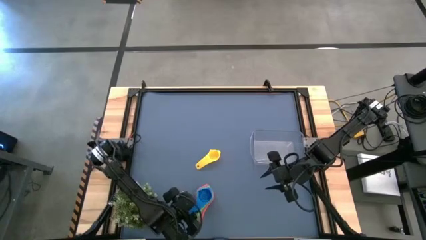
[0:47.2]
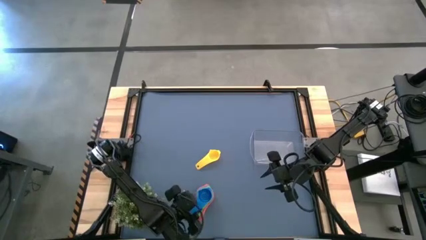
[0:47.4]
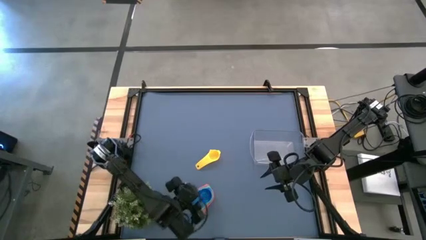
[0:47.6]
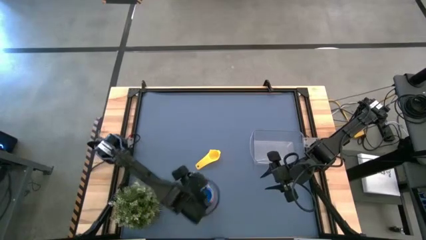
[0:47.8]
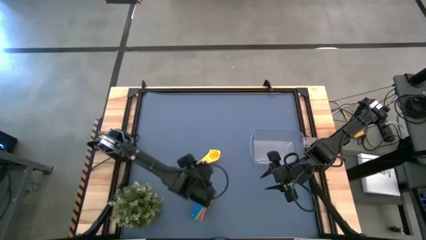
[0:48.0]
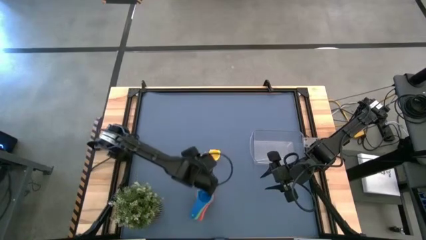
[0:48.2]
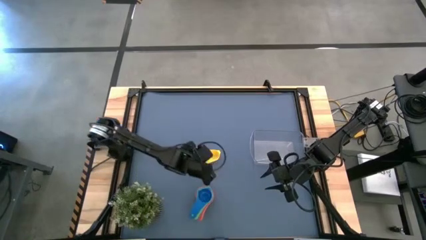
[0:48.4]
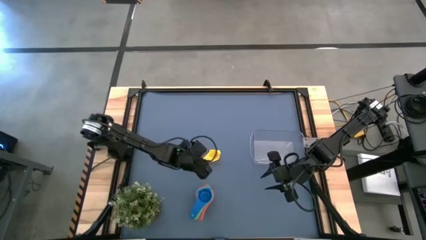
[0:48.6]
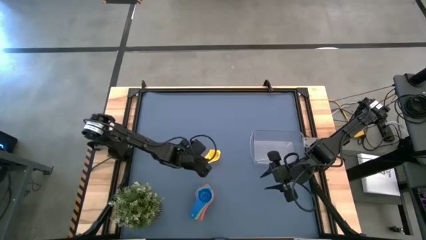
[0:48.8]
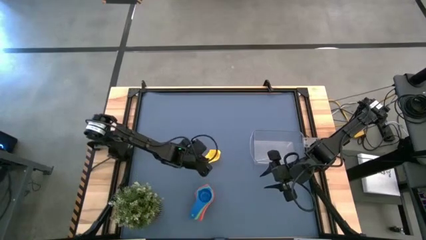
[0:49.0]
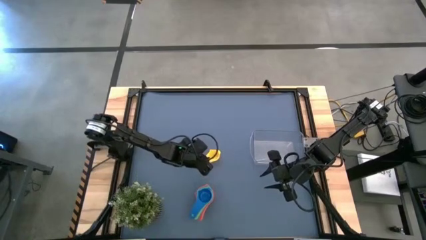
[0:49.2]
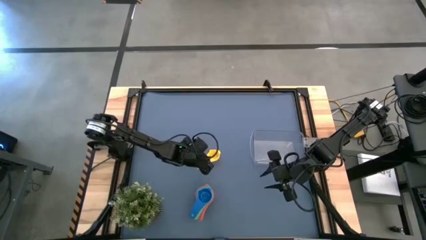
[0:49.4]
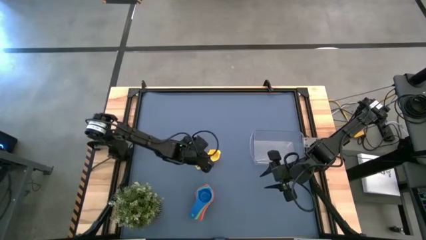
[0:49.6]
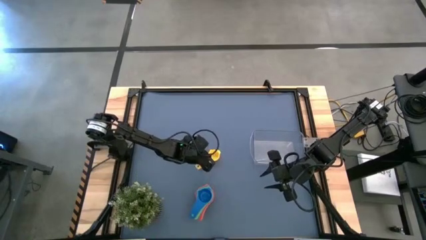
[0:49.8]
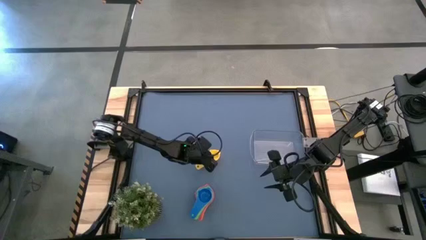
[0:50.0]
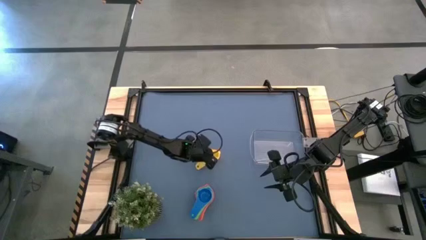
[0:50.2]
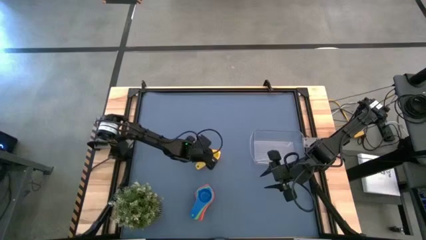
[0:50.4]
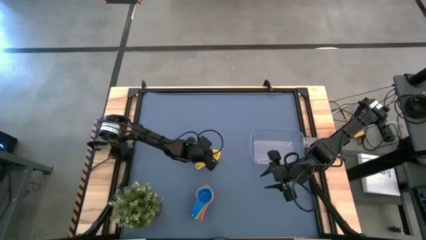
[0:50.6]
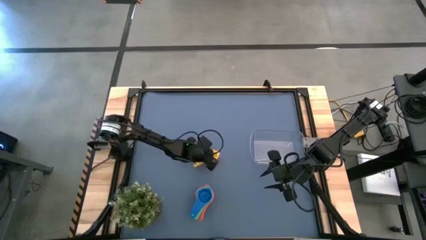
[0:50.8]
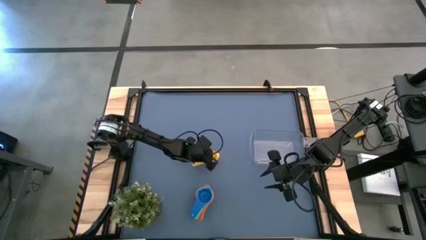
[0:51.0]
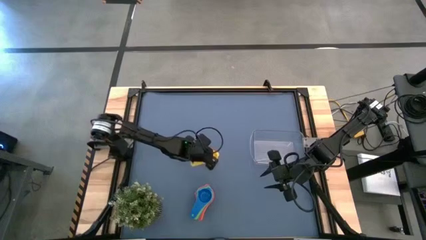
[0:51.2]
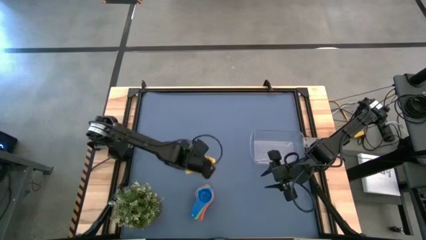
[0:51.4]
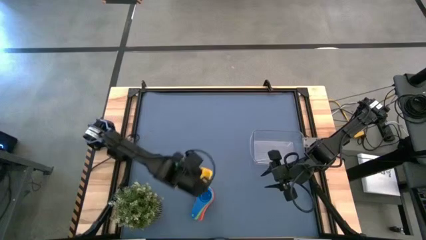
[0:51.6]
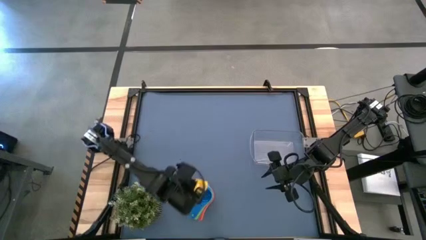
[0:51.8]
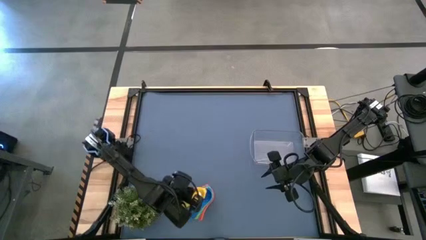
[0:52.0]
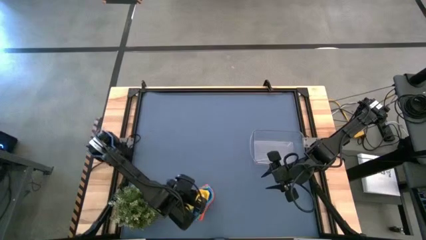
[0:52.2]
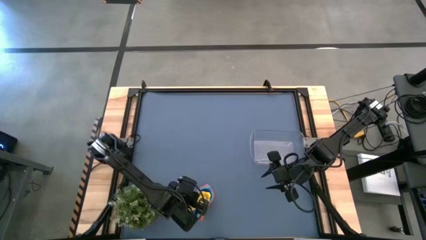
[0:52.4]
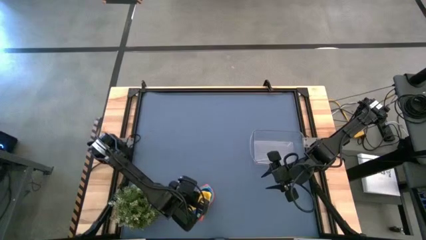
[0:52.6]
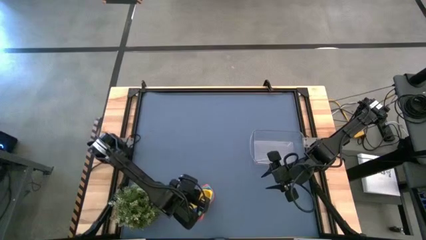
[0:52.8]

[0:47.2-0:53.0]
Task: Nest measuring cups in basket
Stack the yellow measuring cup on top of the blue measuring cup

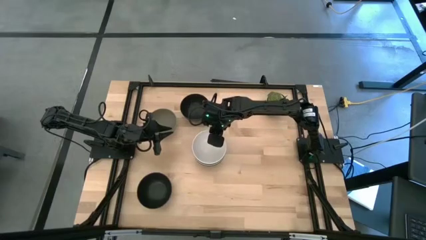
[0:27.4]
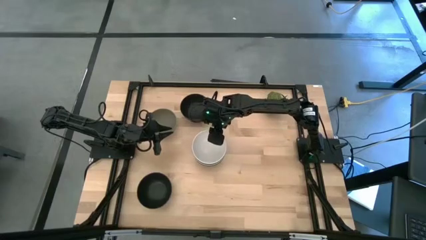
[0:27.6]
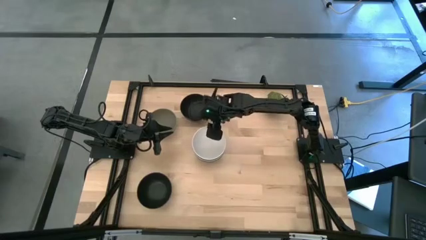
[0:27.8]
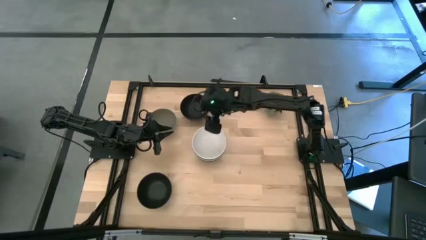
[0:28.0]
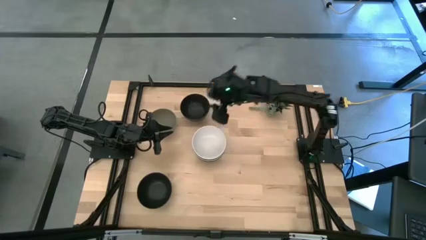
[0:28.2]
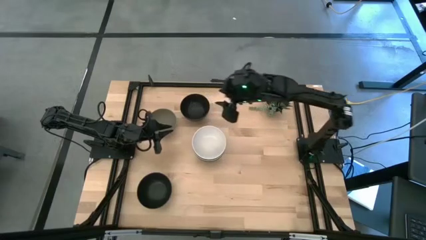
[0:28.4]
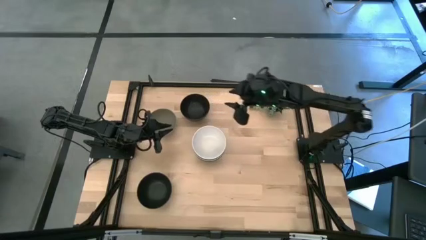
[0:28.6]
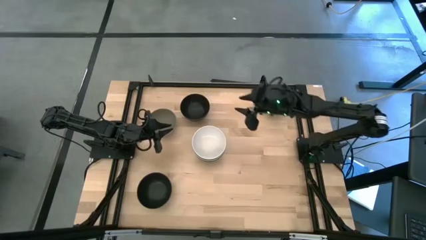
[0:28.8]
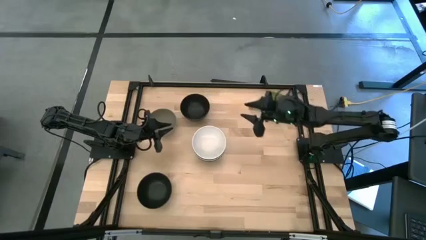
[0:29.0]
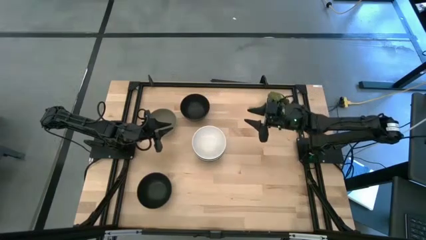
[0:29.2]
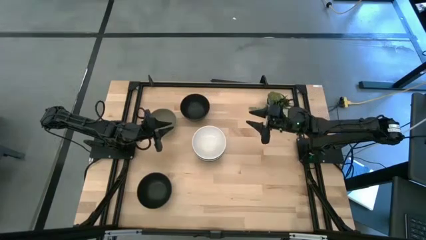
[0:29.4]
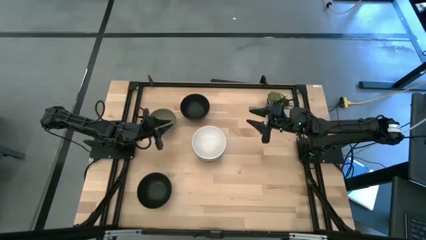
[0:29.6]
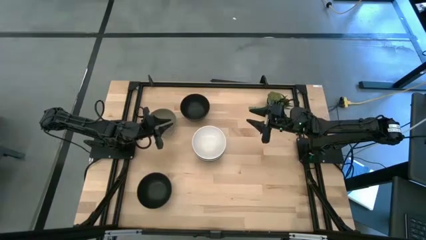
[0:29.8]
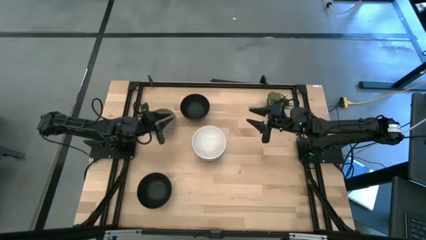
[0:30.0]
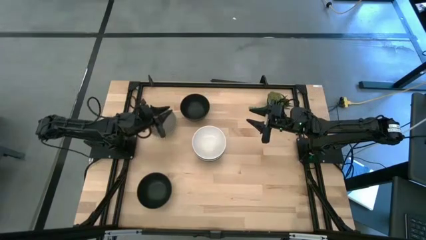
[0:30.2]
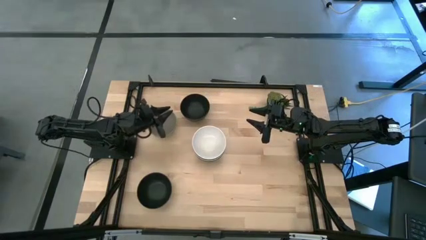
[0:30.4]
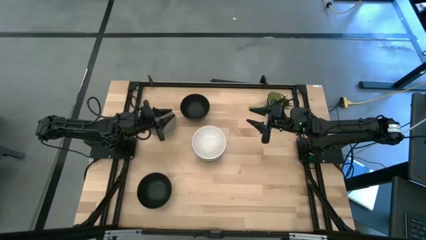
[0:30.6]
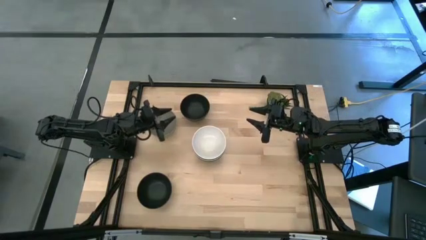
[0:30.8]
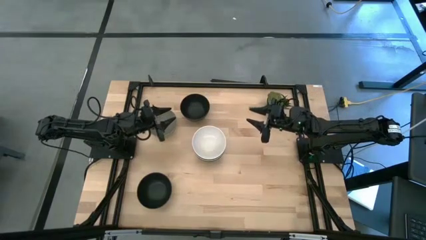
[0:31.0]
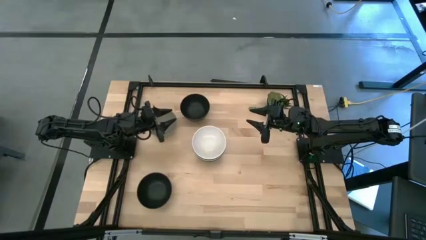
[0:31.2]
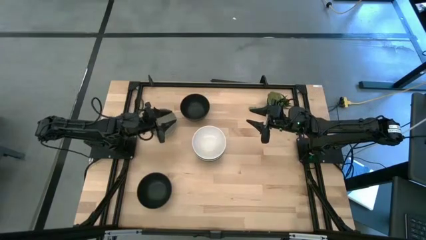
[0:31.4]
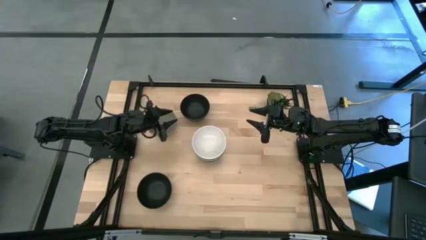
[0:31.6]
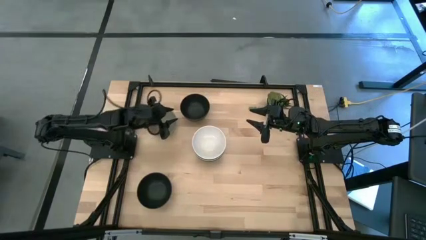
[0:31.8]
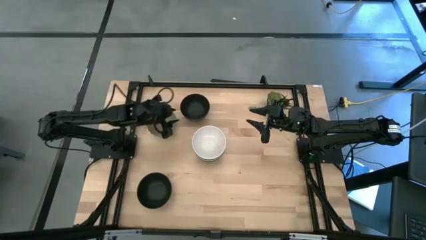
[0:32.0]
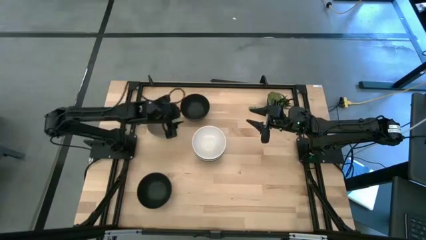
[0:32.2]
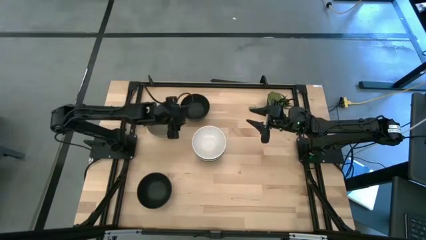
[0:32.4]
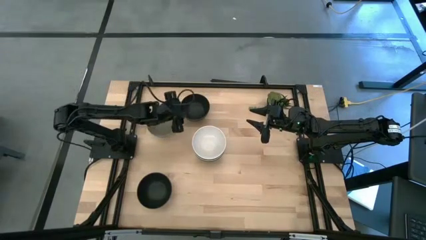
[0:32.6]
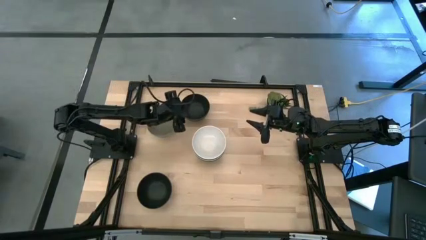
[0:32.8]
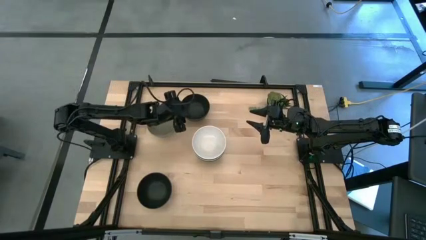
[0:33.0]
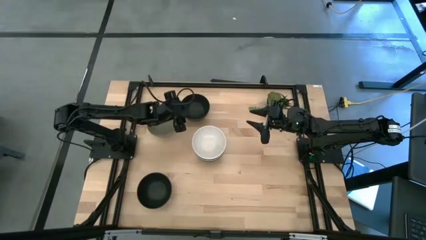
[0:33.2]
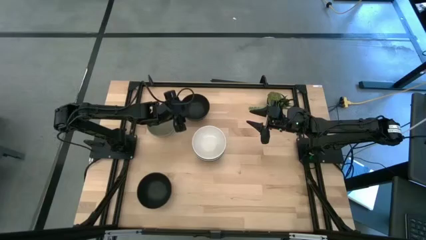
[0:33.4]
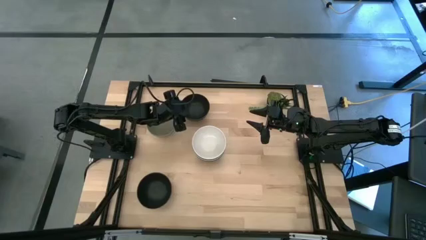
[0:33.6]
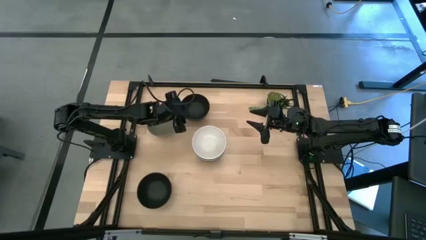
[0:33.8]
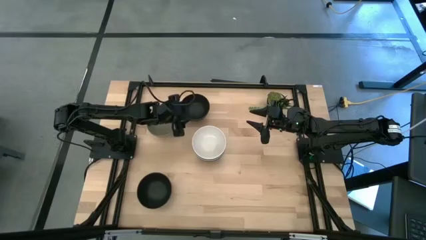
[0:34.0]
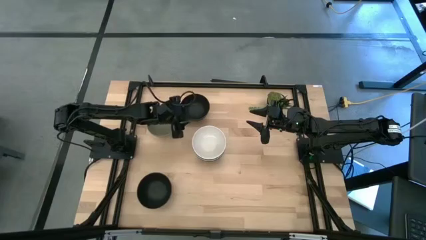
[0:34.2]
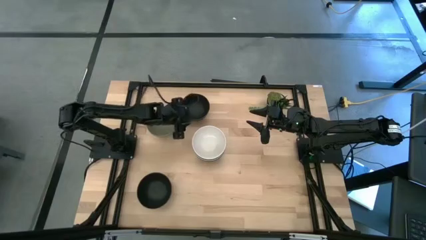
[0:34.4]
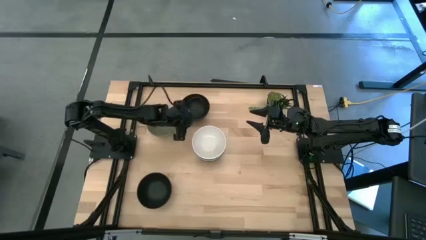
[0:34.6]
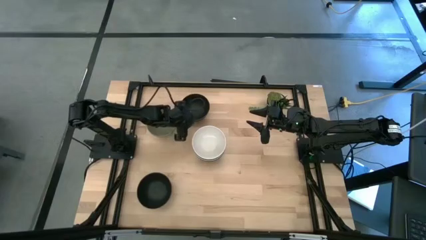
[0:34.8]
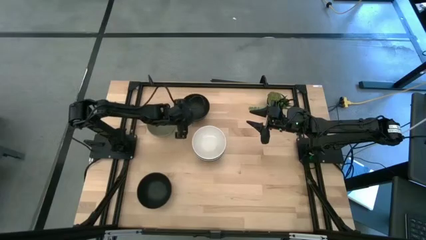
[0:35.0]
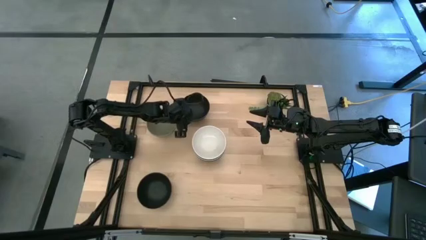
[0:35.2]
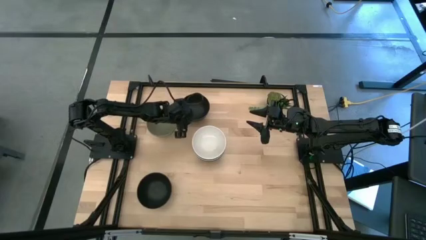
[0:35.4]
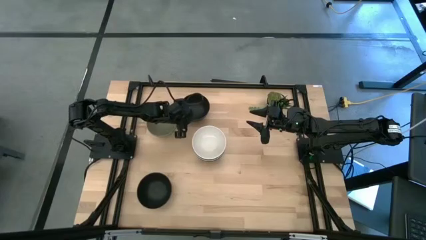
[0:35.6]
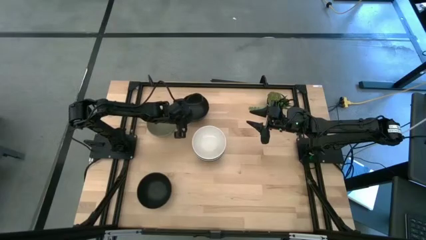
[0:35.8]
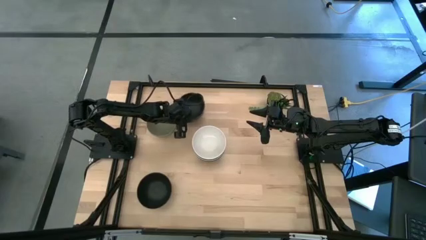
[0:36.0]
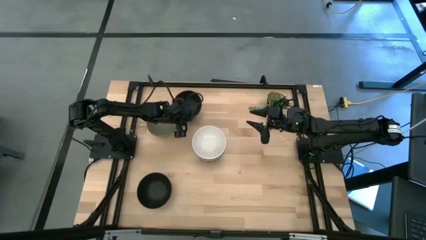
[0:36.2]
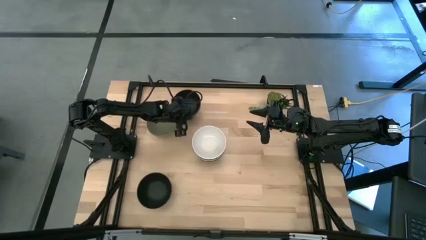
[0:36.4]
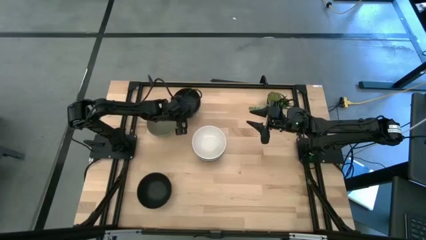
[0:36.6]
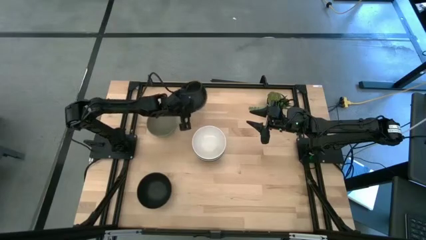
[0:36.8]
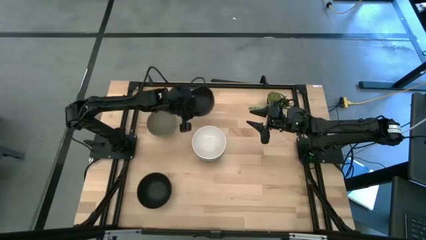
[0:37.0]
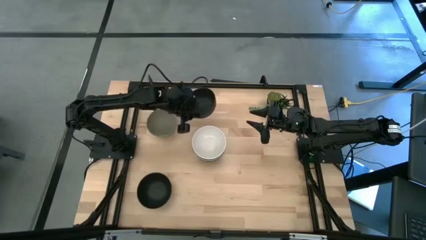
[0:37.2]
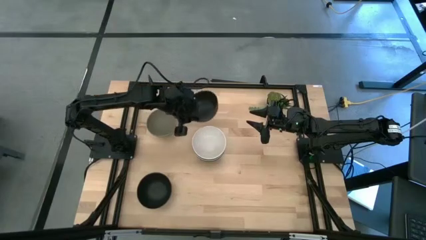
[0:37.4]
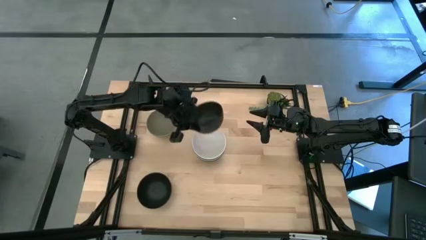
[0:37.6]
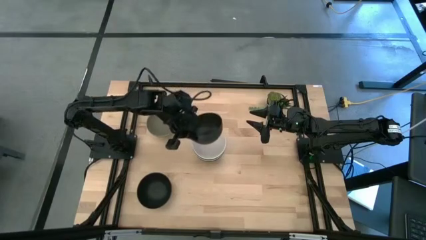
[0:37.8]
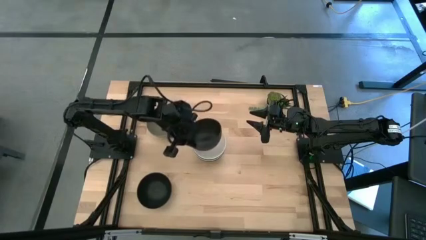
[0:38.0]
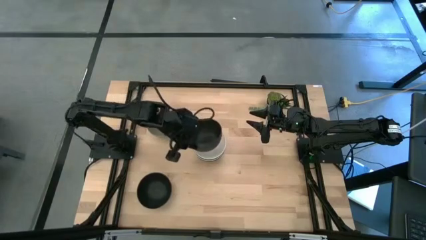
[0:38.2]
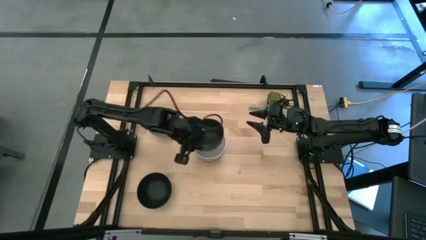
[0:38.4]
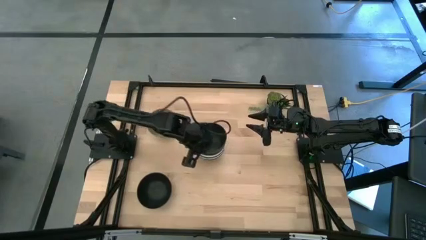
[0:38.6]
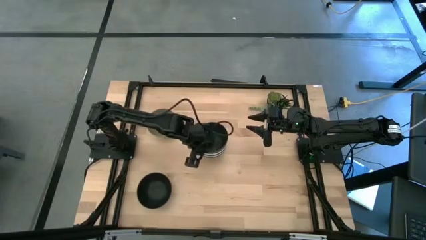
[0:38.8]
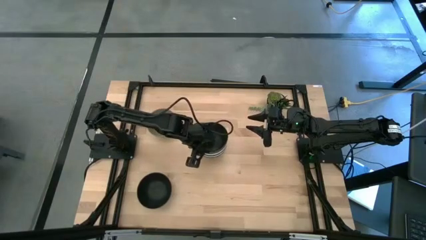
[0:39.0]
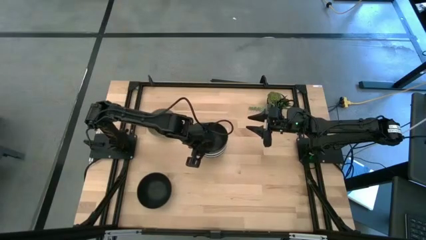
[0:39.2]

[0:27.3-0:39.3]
Task: Nest bowls inside each other
Stack the black bowl on top of the white bowl
